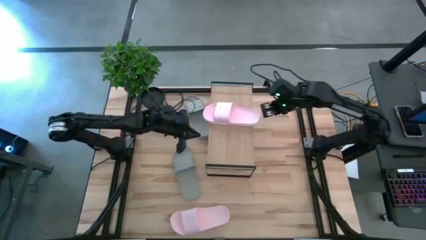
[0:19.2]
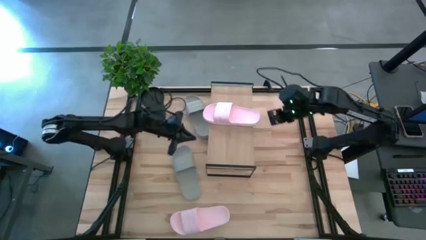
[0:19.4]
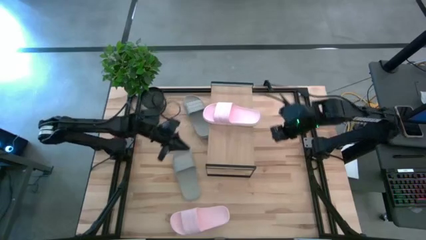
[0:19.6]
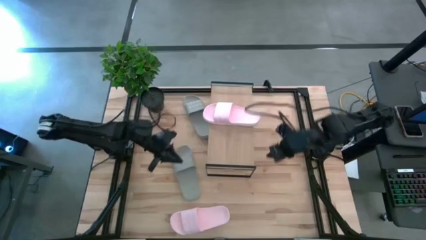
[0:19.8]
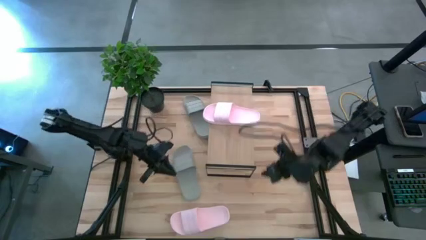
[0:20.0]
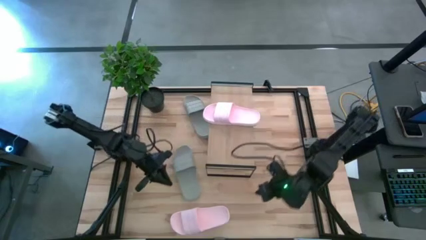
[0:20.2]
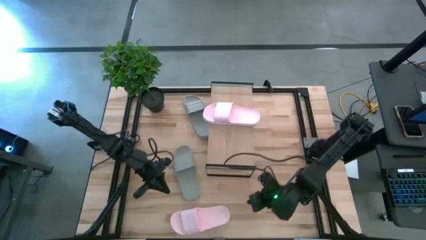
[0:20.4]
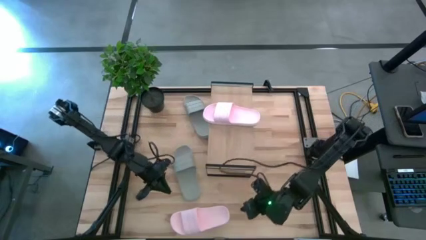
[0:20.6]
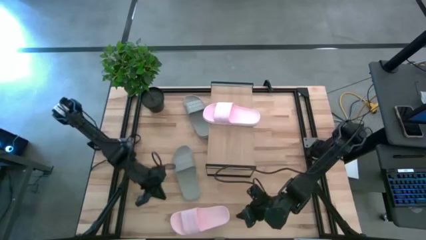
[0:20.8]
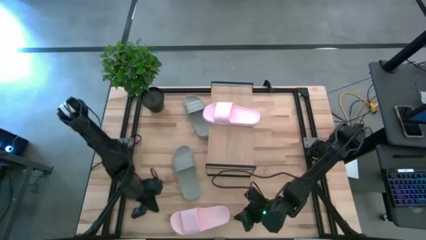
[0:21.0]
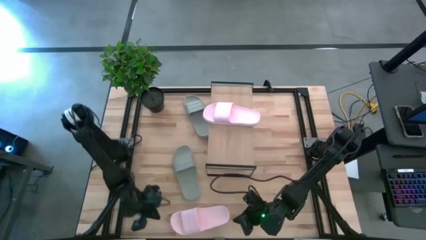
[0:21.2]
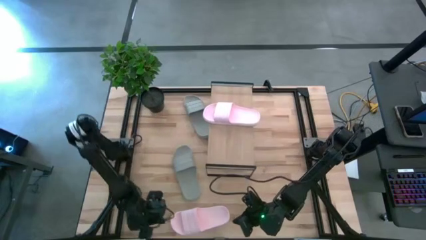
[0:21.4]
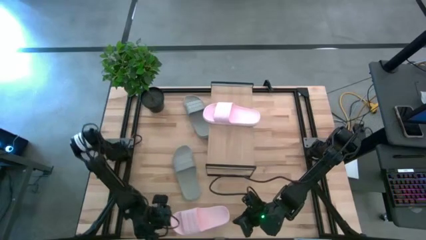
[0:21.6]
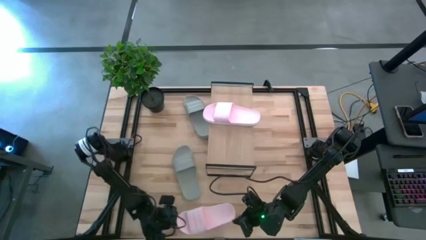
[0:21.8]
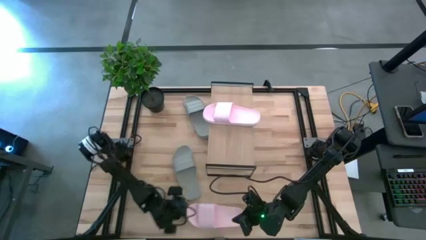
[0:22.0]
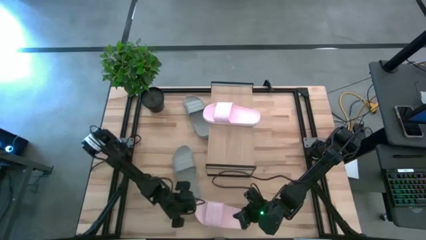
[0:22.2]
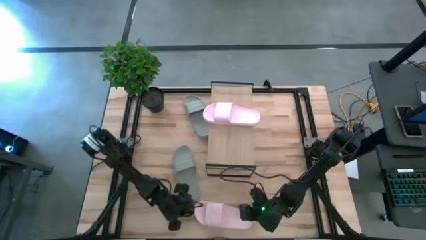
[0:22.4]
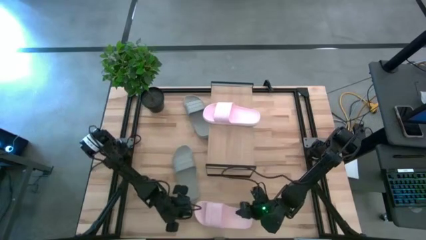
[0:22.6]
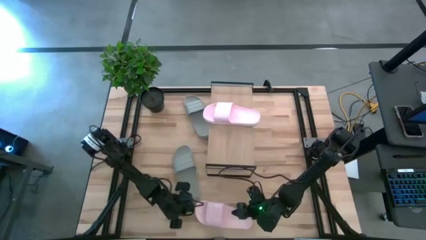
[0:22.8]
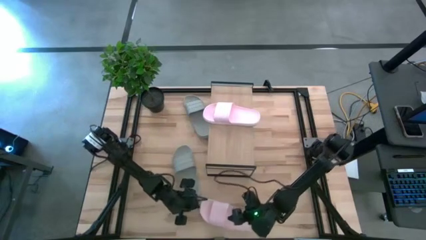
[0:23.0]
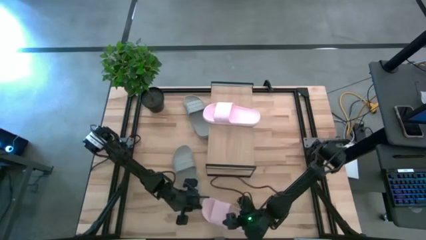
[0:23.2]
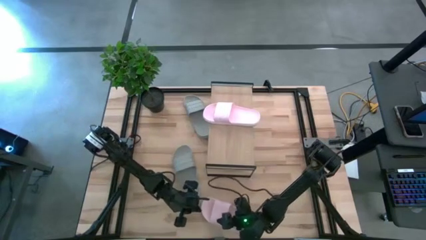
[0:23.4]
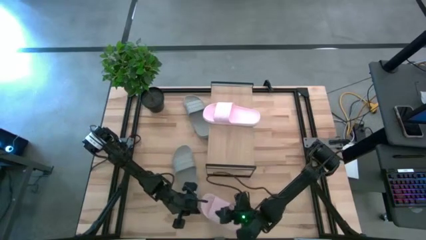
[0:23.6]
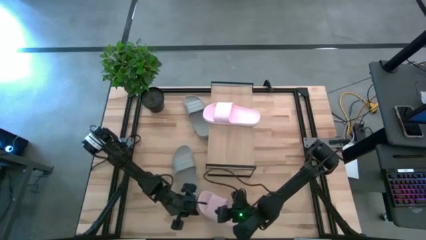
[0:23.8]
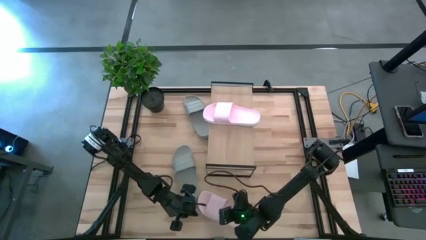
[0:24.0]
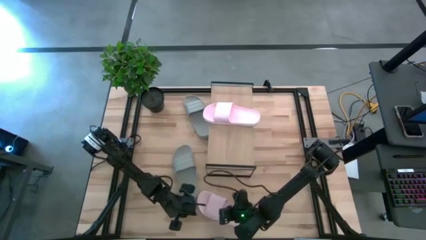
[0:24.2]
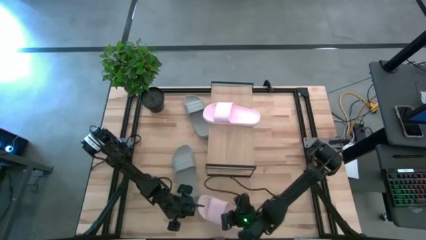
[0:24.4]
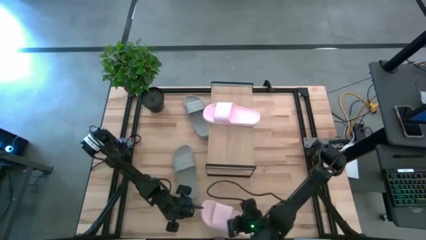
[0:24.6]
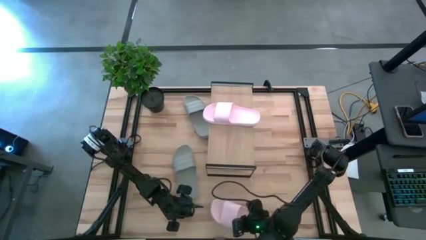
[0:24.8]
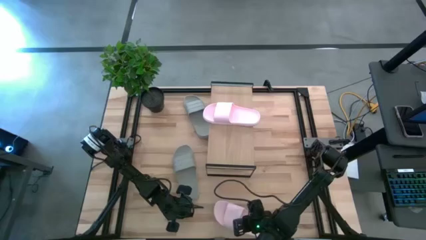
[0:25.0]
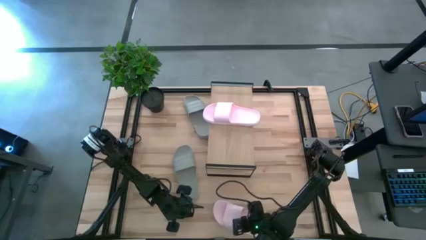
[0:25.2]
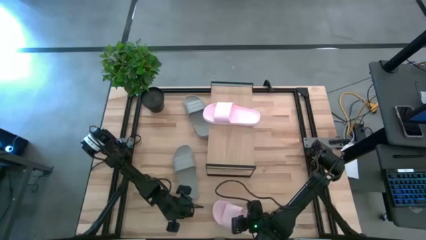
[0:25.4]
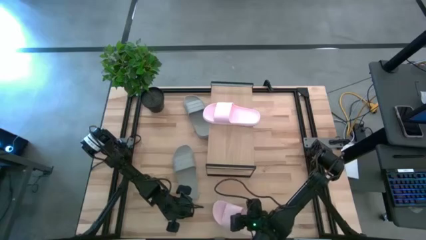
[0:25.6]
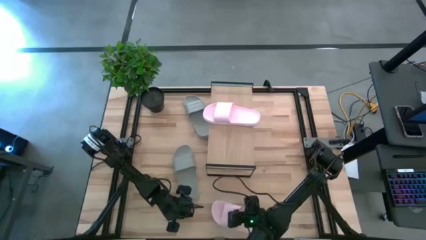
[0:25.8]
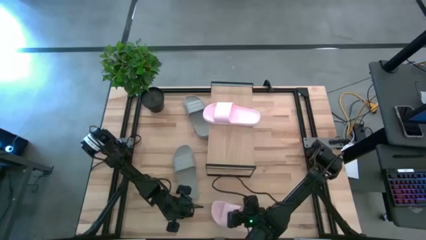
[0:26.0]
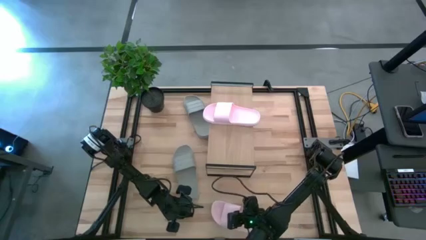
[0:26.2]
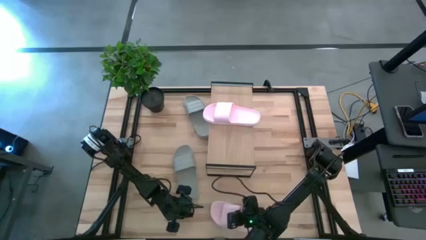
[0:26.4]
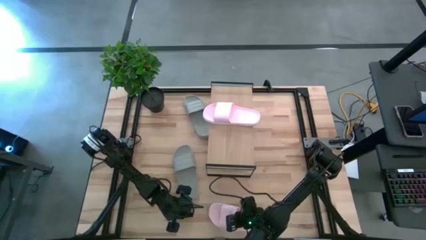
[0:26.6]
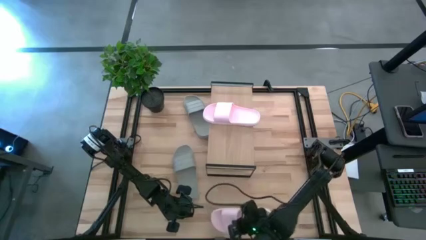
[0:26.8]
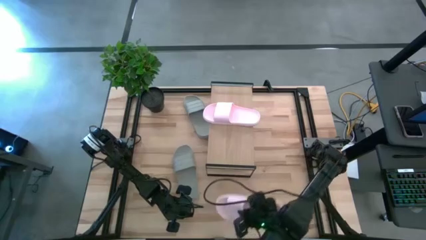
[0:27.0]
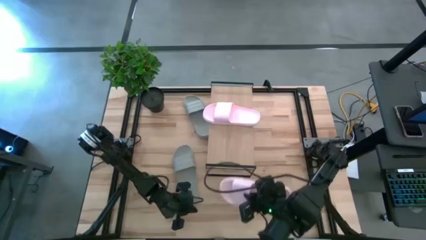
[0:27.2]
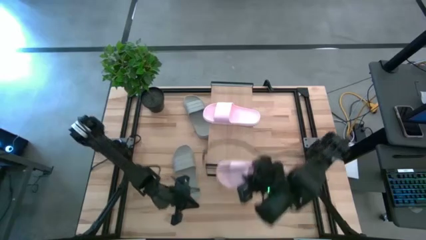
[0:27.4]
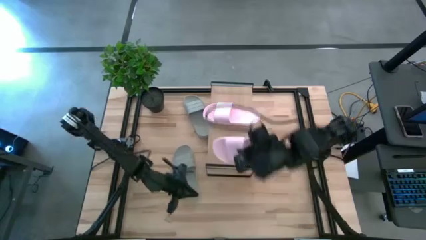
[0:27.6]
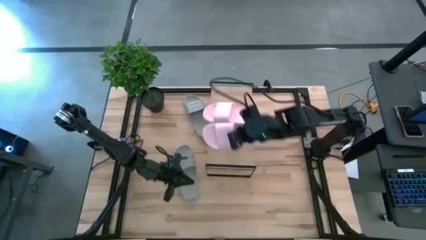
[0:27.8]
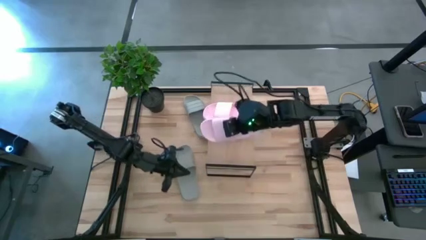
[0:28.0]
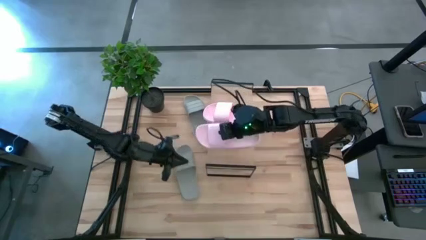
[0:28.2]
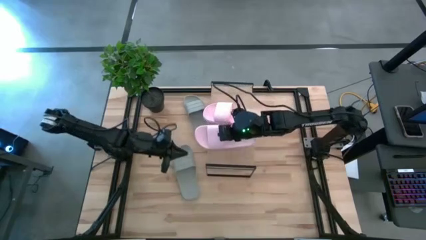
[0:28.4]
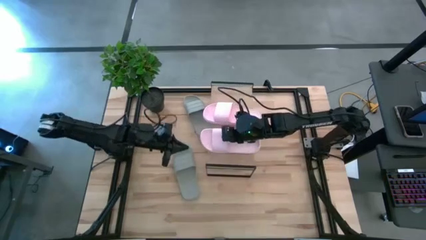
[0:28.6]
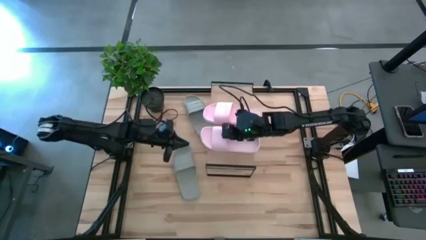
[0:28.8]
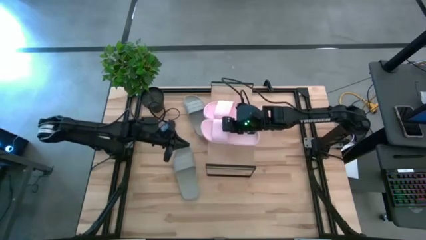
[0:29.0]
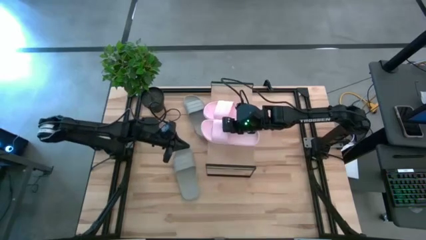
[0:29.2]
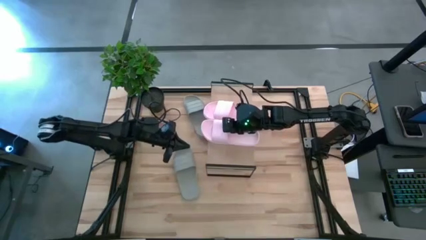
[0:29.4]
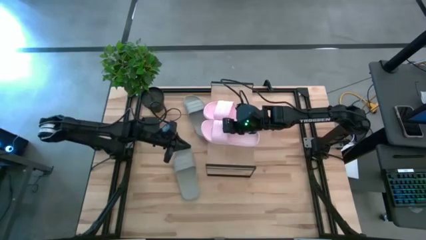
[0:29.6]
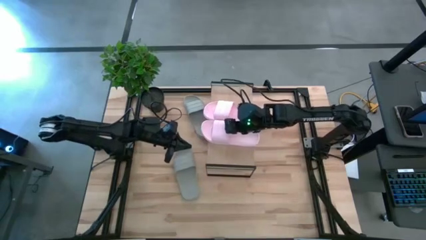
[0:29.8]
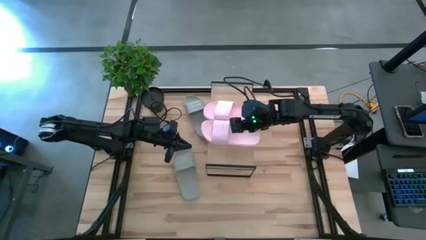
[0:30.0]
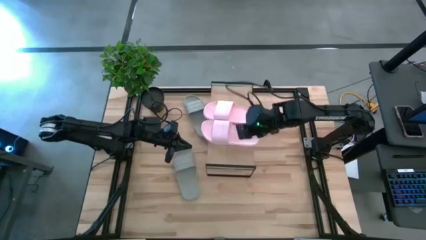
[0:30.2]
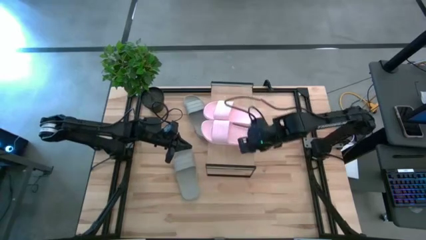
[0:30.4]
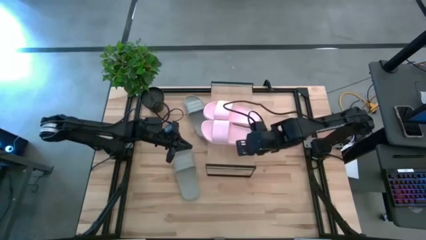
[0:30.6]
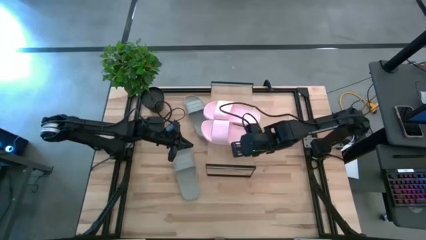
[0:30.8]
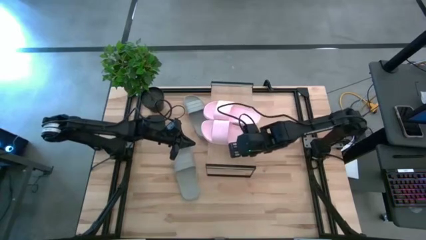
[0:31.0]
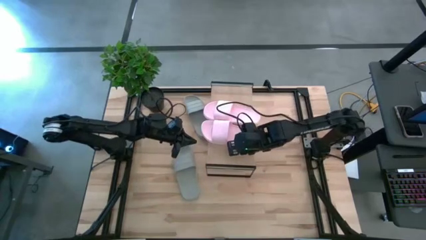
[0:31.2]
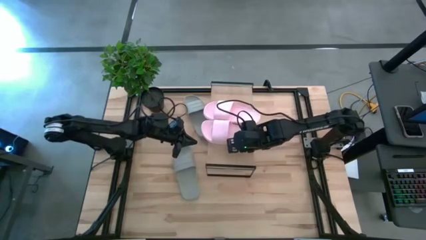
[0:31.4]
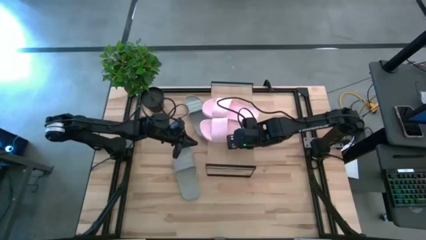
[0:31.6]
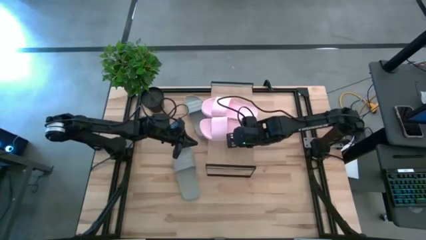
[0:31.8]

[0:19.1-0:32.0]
Task: Pick and place slides into the shelf
Put the pink slide on the shelf
